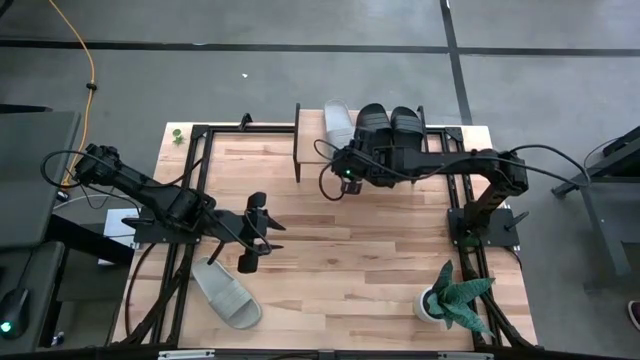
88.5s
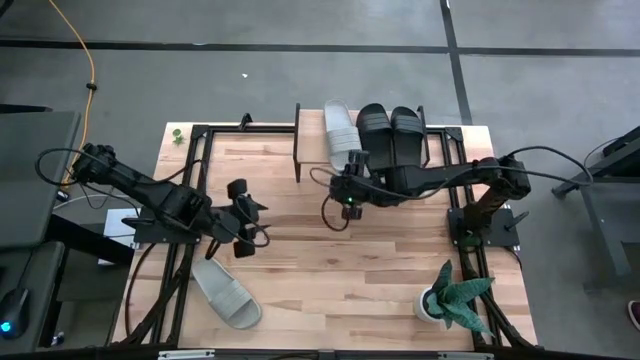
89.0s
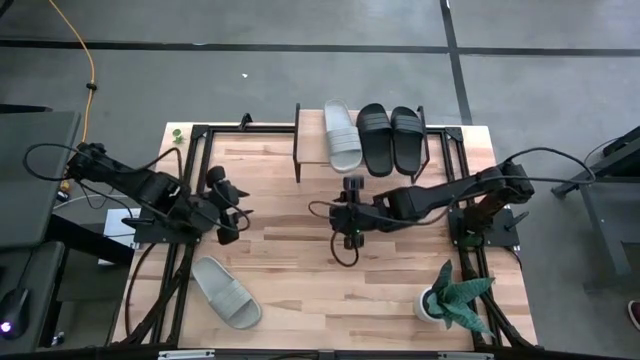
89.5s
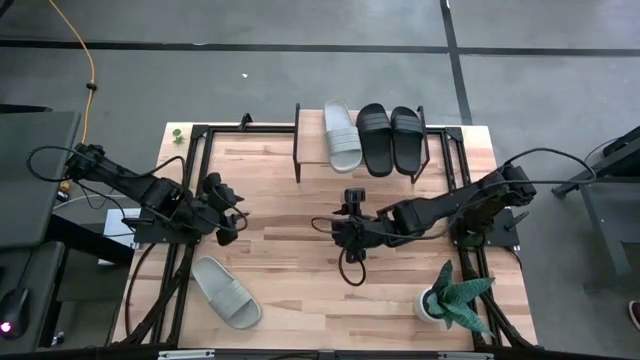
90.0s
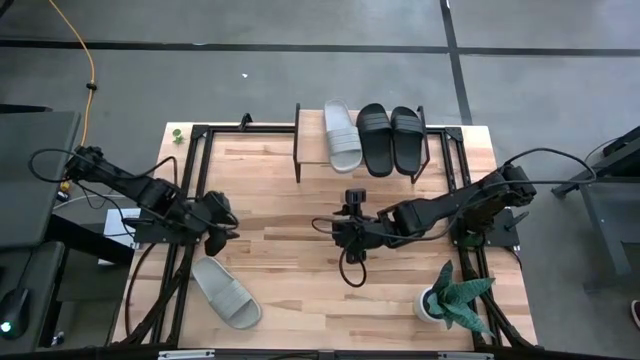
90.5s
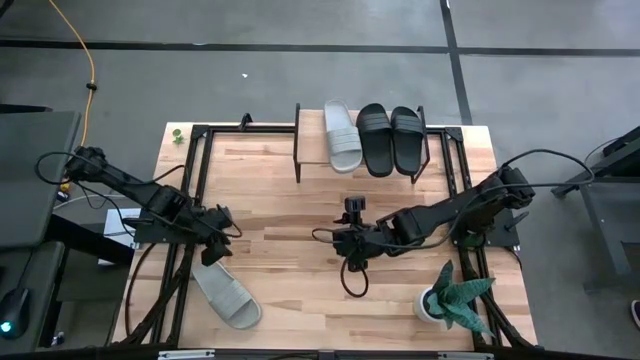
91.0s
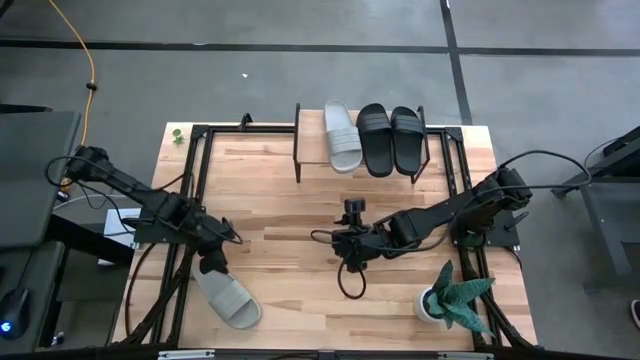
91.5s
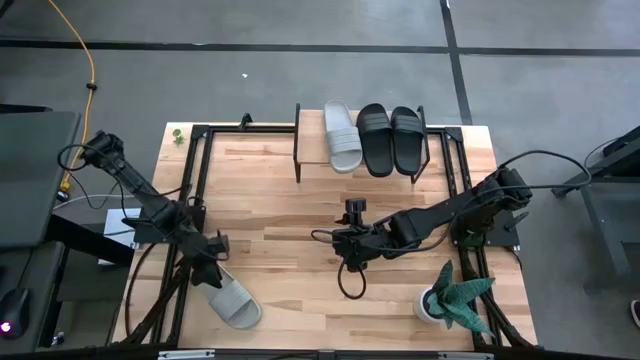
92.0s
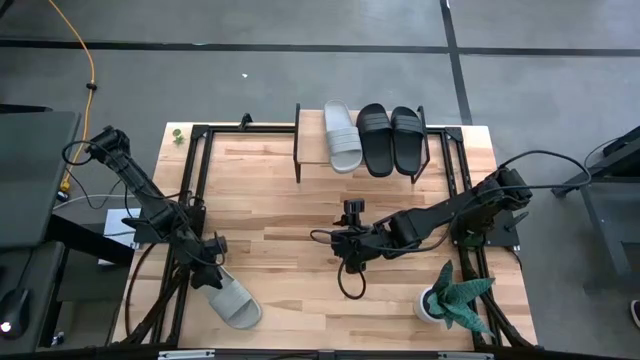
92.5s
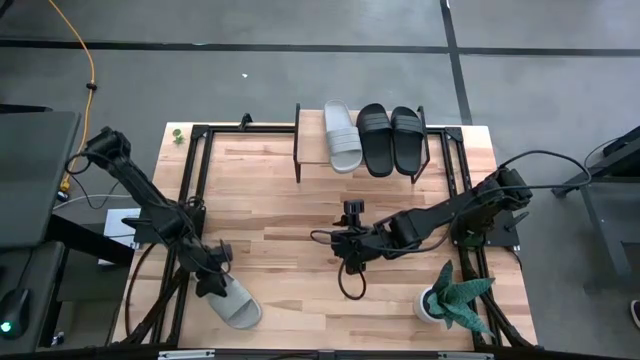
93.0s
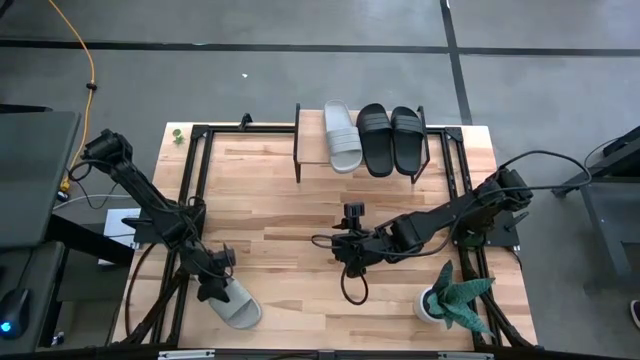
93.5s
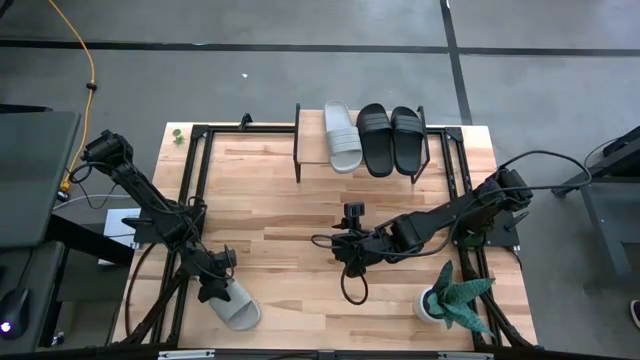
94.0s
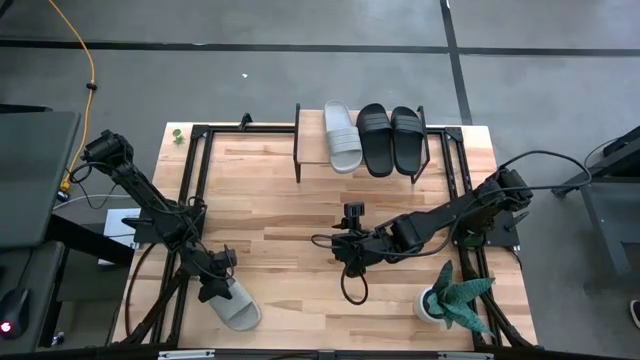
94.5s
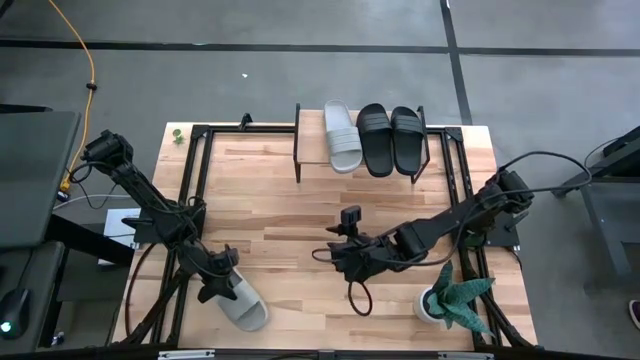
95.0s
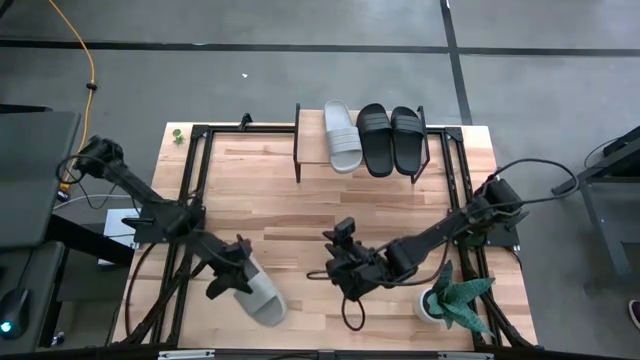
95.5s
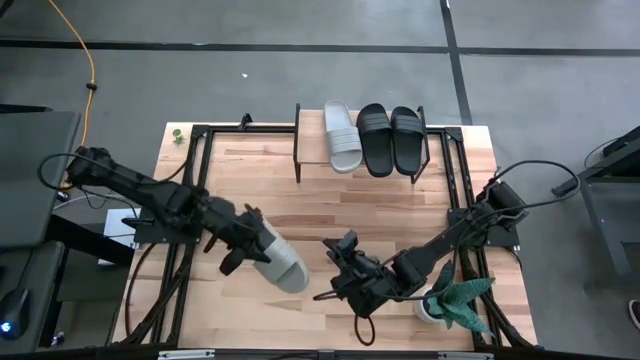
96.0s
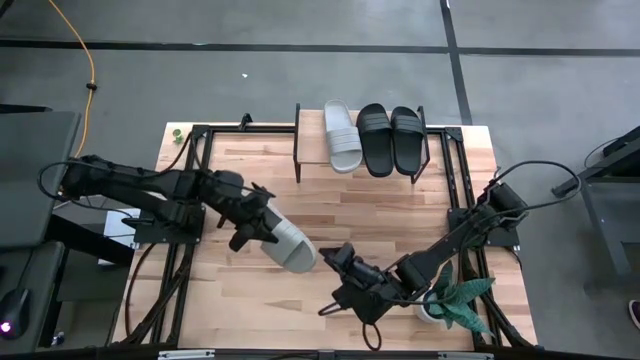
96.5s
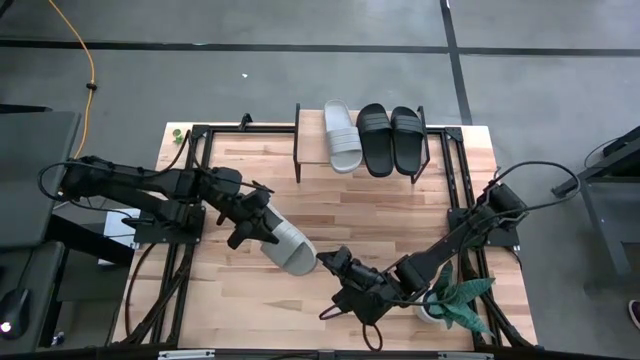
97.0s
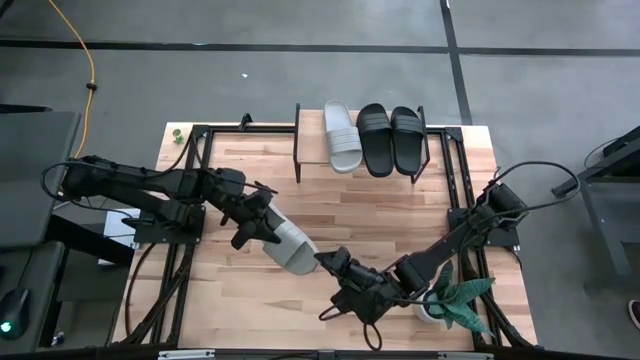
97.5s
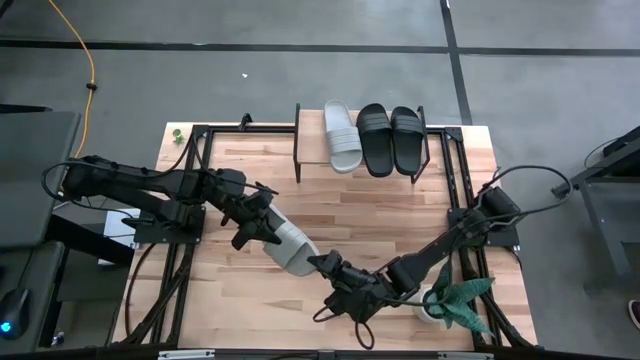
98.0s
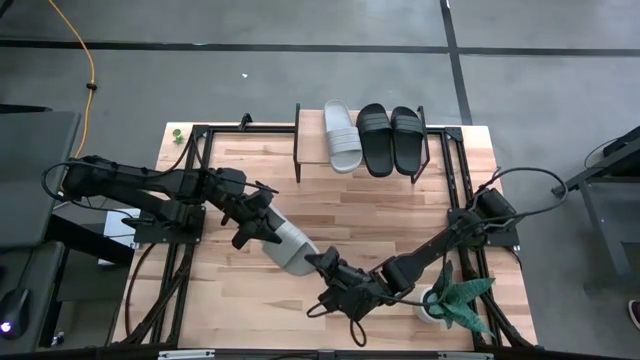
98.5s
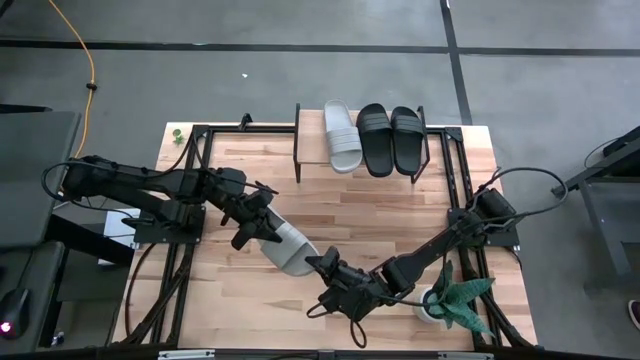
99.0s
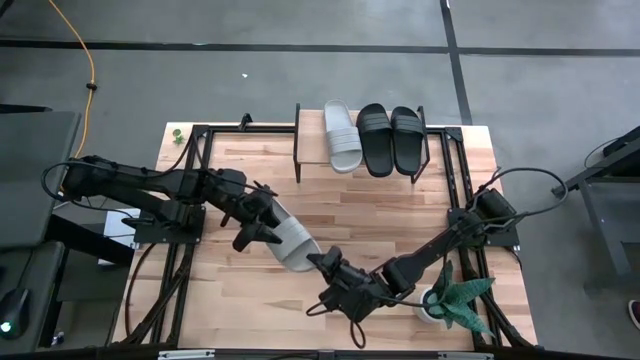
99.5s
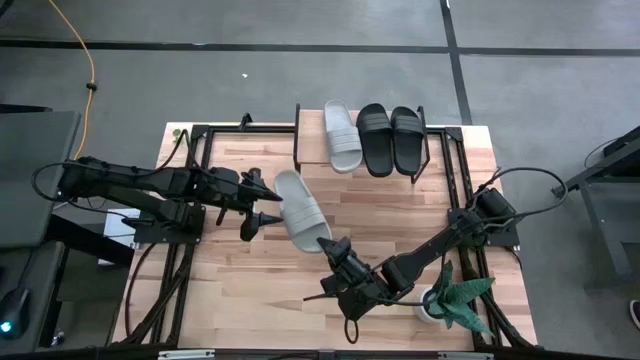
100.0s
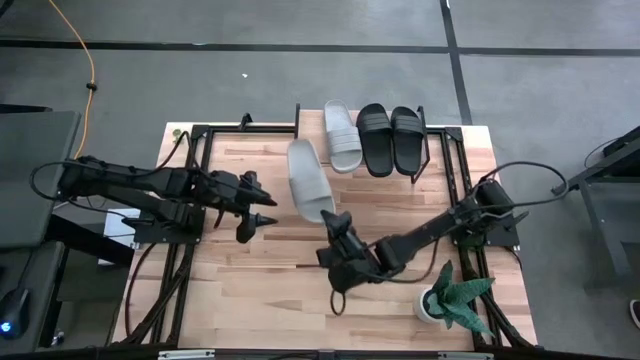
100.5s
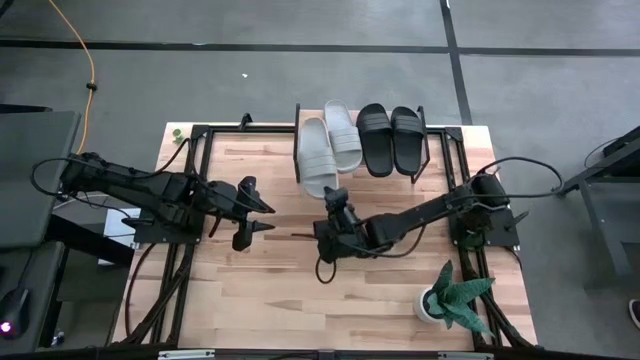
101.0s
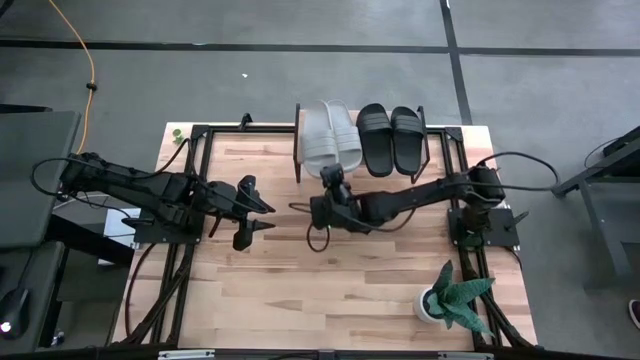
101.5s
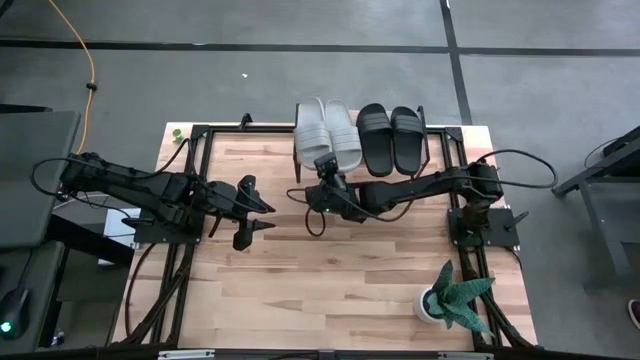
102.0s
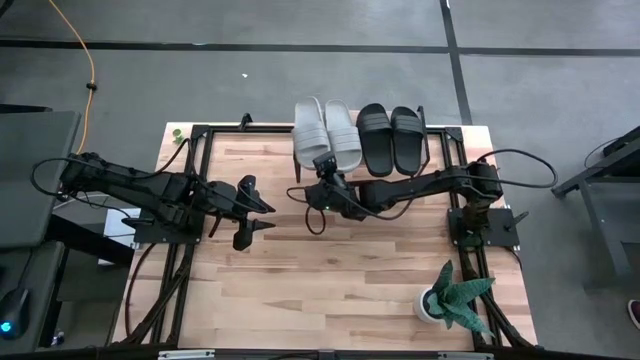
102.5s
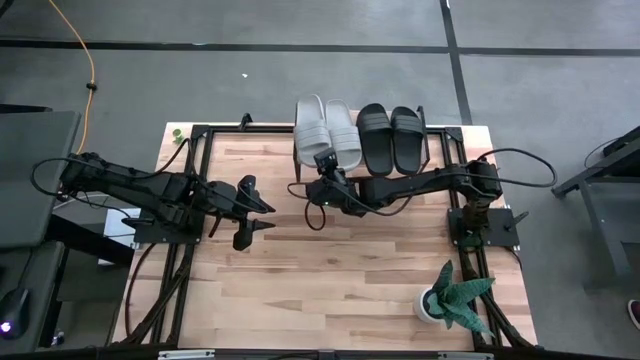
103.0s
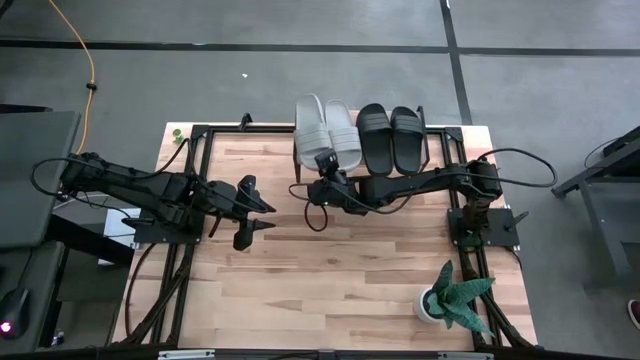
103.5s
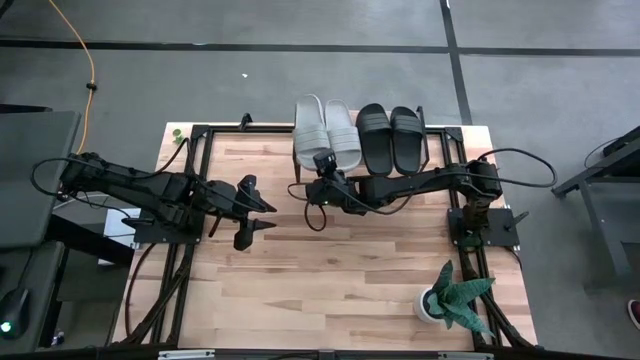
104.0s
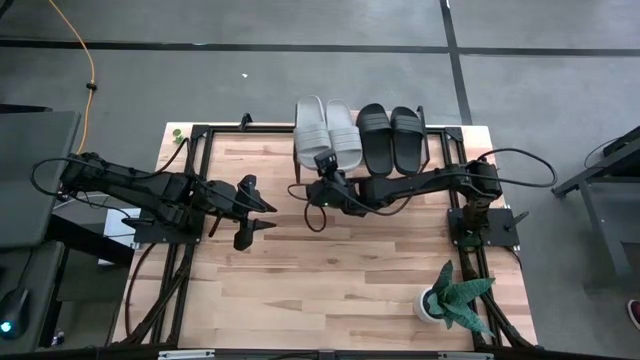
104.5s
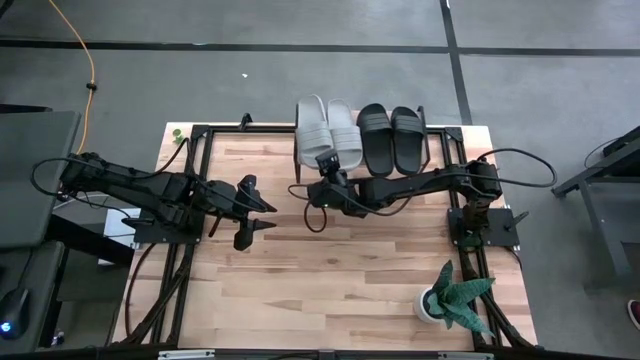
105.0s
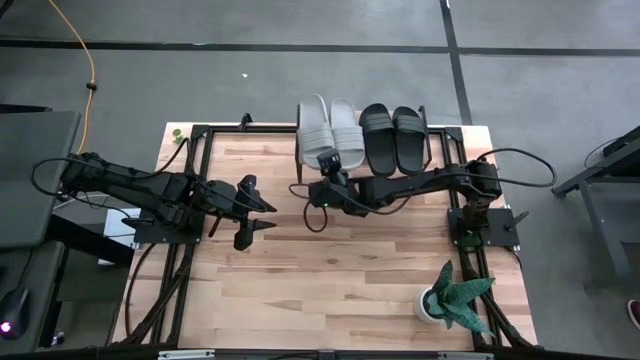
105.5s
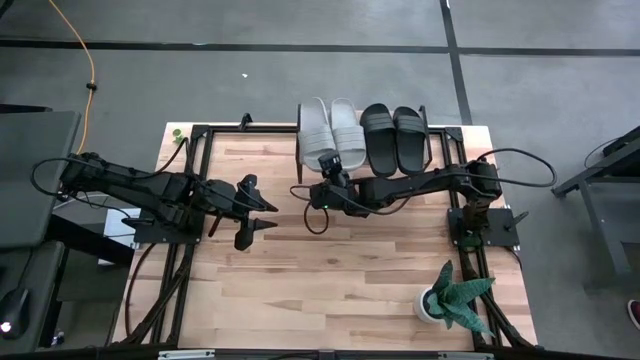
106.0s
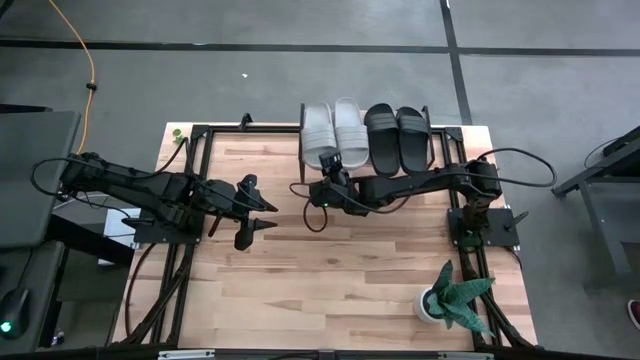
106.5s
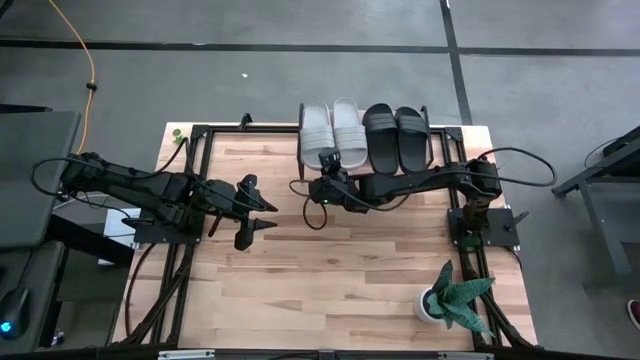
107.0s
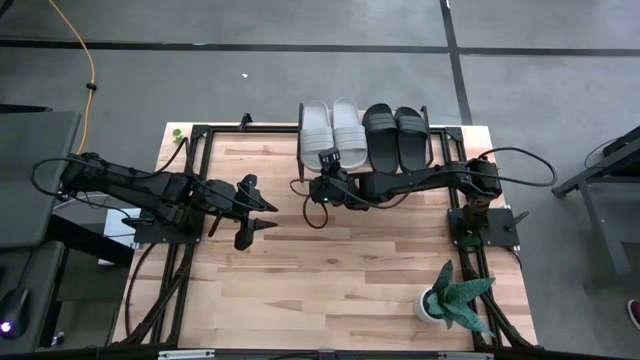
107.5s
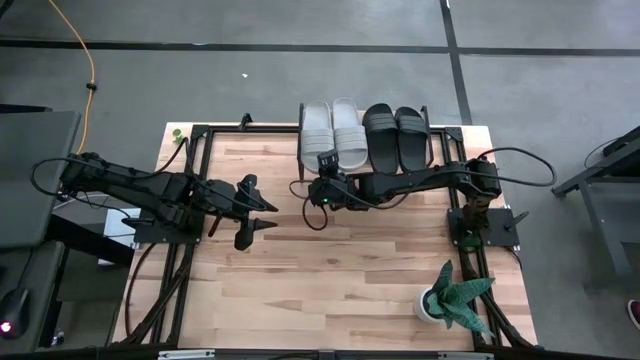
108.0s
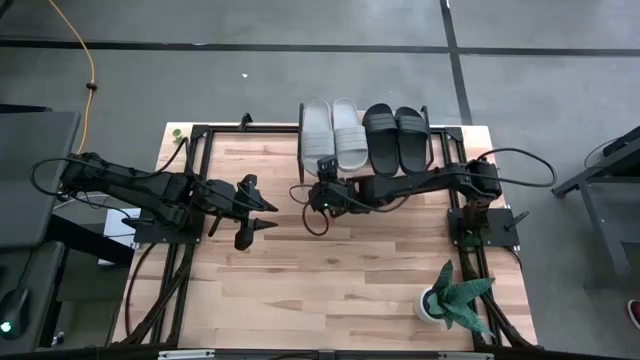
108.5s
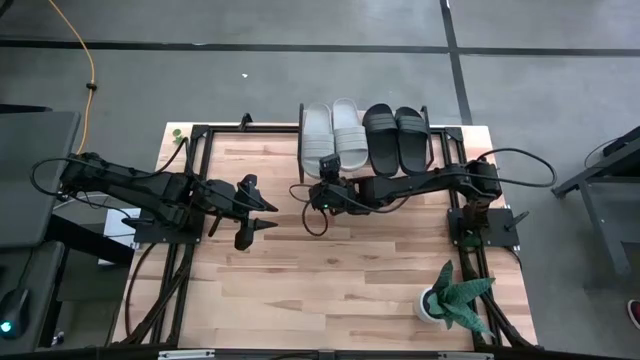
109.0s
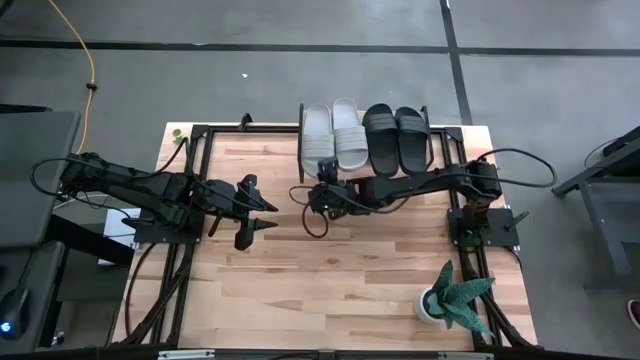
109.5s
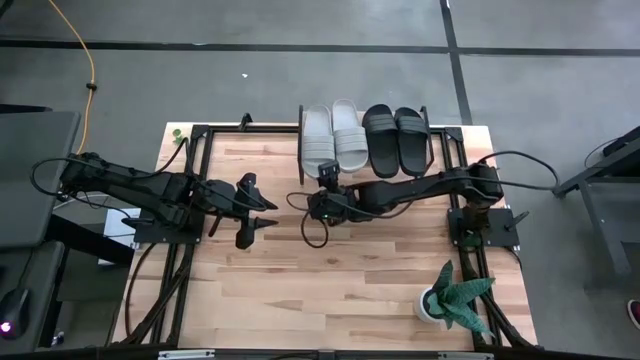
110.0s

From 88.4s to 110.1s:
Task: Pick and place slides into the shelf
Put the gray slipper on the shelf
